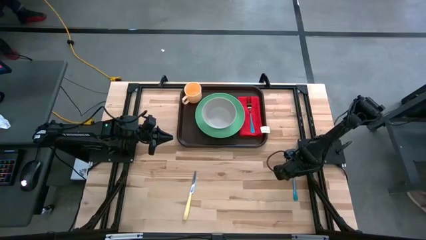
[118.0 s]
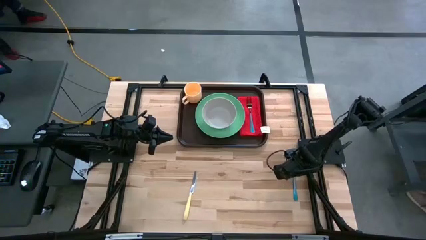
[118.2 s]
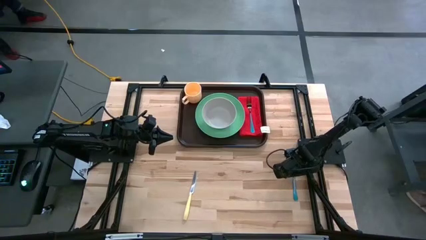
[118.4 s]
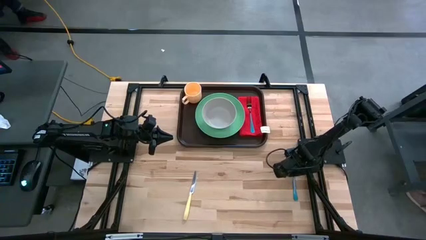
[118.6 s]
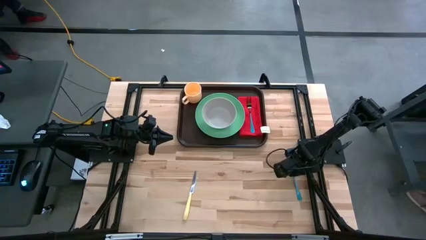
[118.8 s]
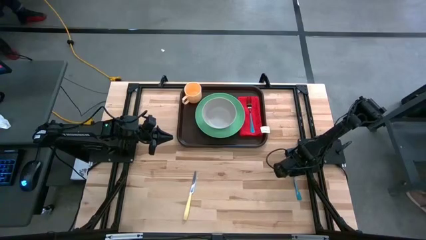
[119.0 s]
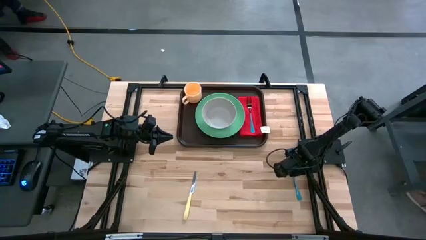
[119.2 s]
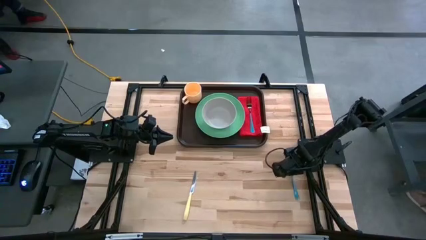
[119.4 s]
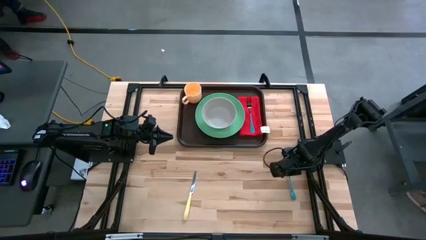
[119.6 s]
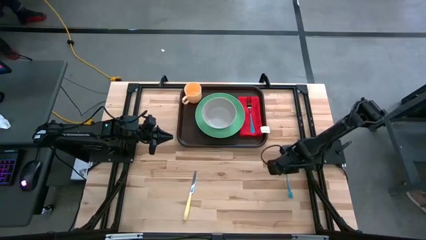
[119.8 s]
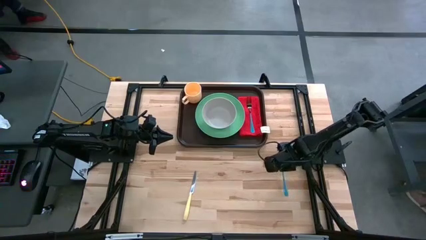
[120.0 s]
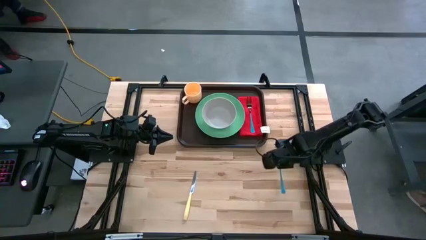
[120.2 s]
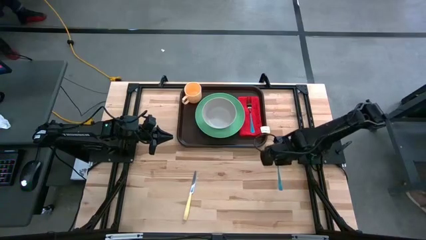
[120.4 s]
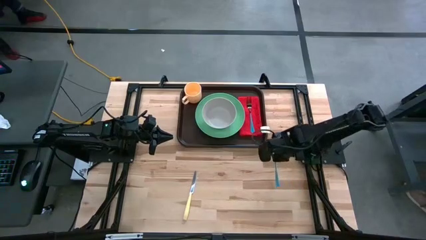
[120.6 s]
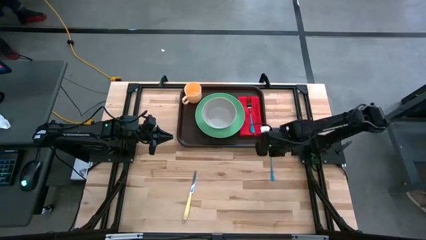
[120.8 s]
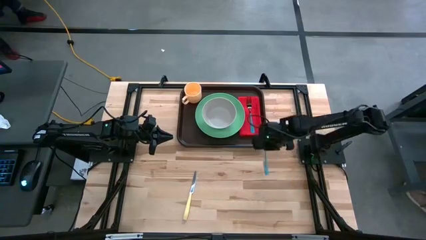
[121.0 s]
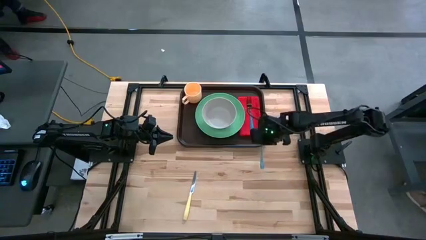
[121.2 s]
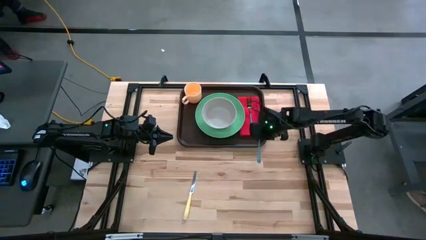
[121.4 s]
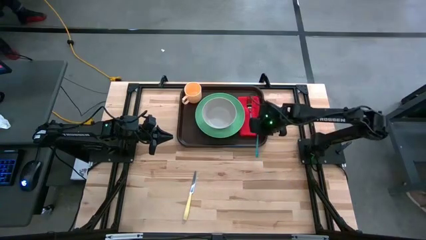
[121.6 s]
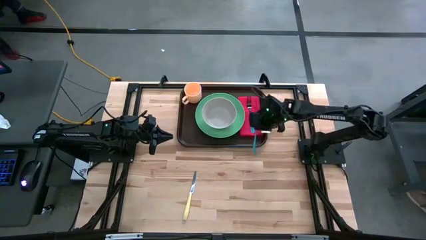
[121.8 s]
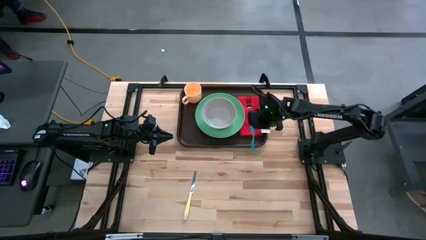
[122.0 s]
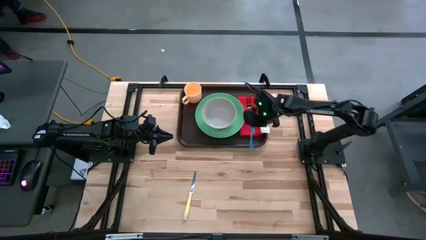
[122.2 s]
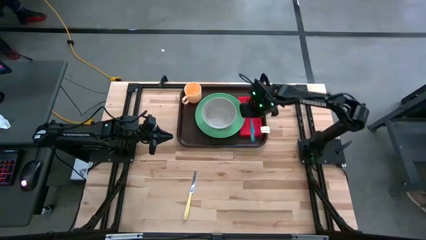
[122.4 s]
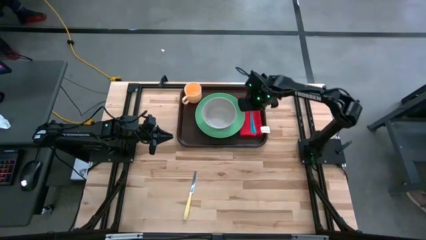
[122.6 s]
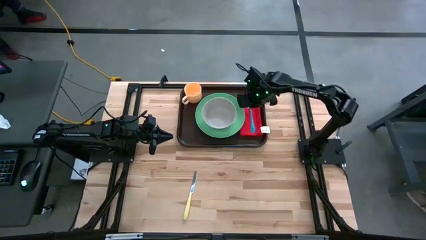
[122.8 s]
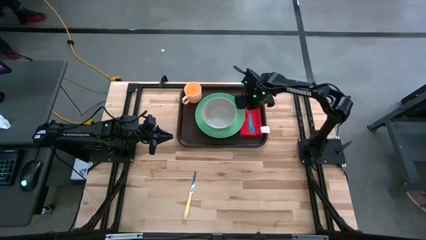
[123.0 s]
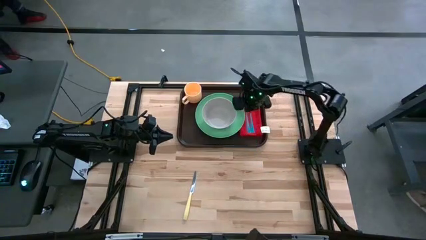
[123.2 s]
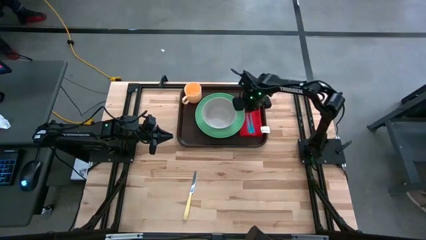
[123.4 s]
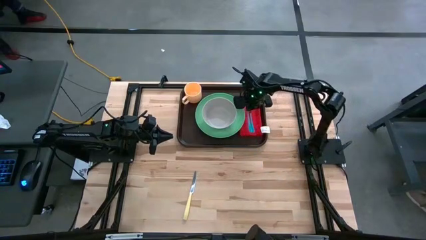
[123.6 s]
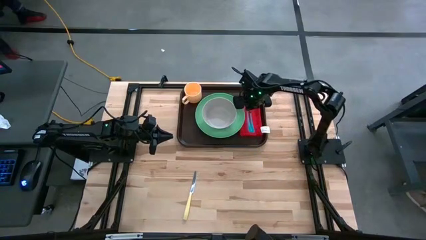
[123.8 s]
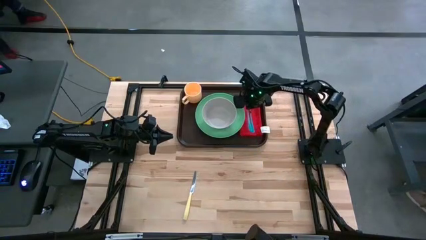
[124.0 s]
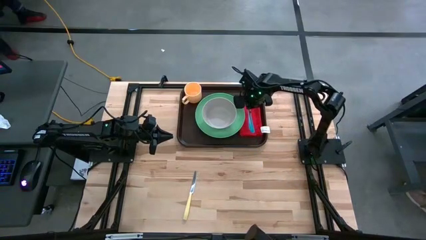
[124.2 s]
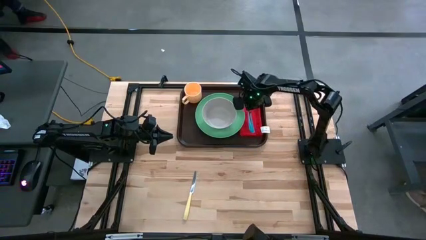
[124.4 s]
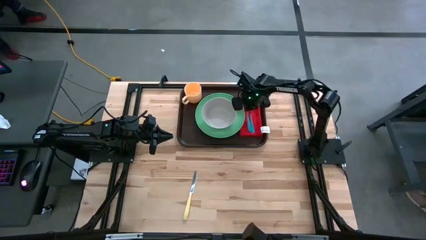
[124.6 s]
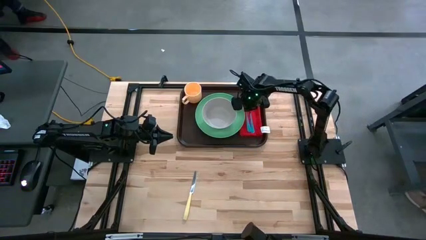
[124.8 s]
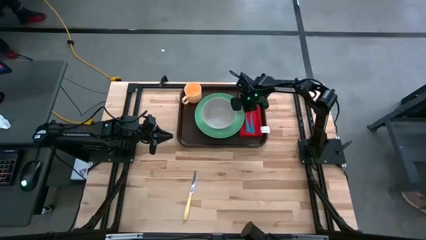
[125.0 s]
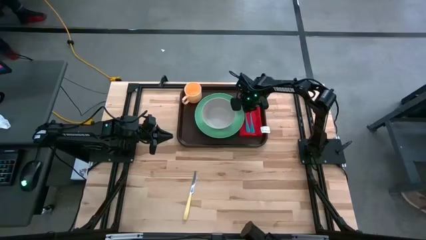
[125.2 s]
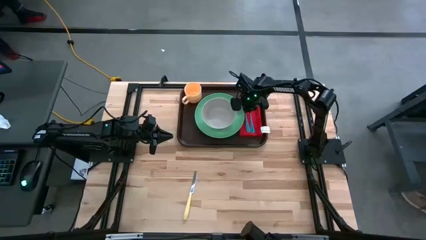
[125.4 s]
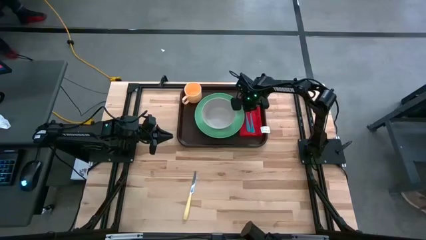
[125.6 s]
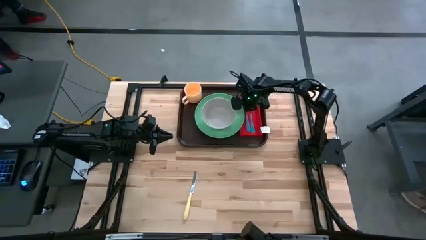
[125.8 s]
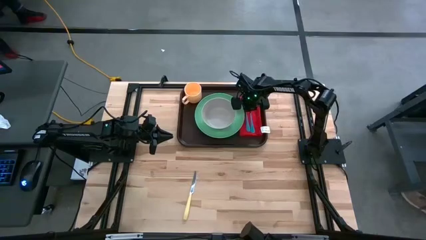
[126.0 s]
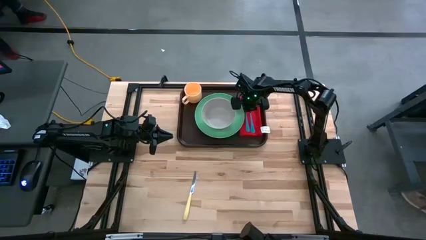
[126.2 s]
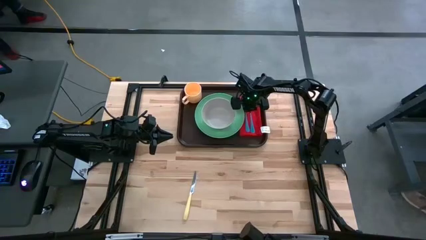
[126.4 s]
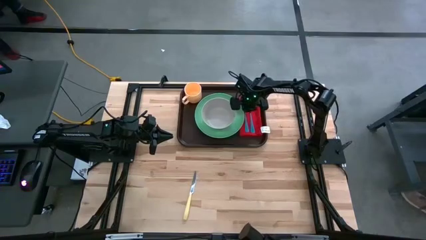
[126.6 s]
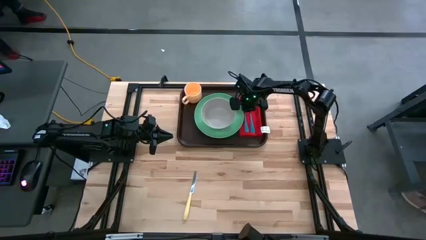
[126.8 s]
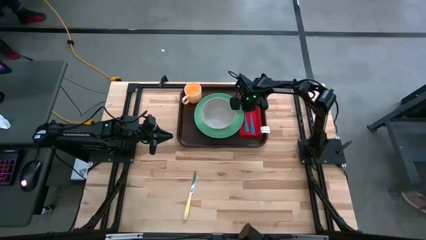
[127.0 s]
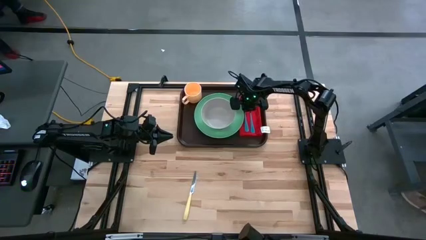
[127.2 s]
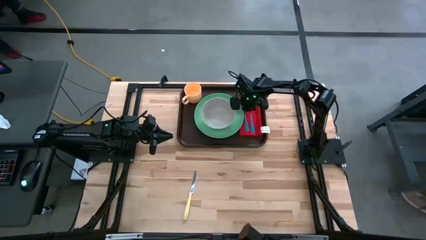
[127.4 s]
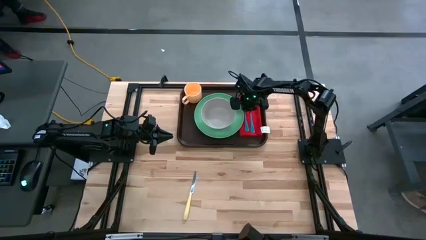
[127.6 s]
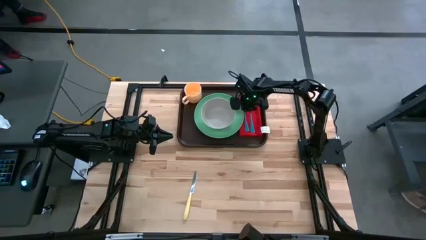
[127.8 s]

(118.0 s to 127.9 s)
Task: Set up tray
Put the blue spoon on top of the red napkin to the left of the blue fork

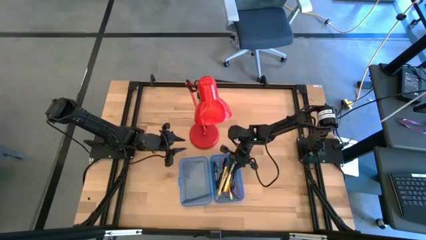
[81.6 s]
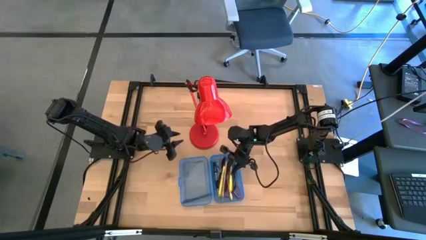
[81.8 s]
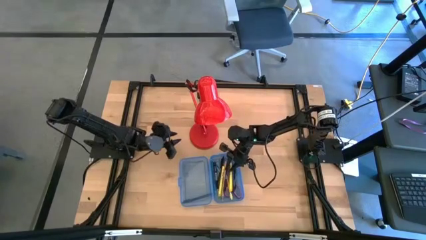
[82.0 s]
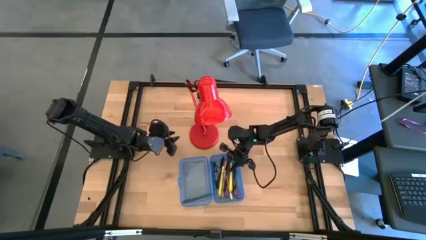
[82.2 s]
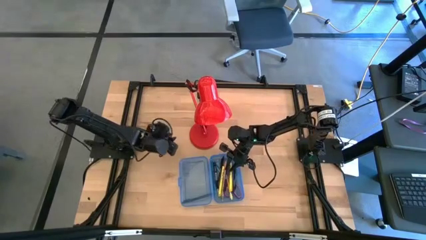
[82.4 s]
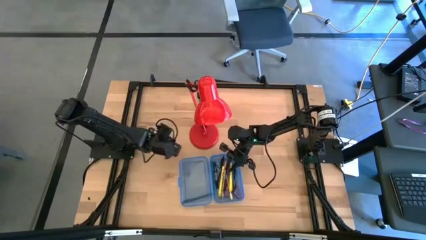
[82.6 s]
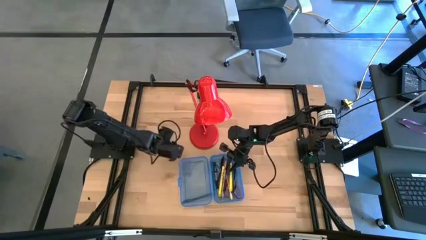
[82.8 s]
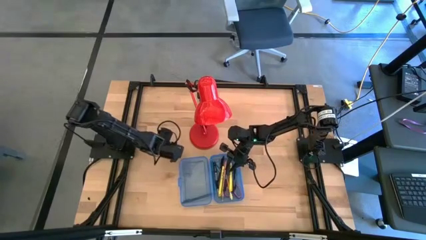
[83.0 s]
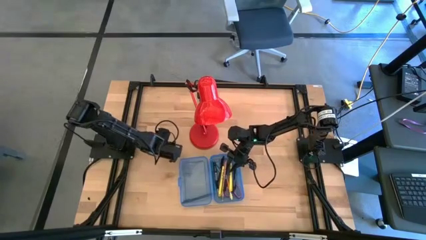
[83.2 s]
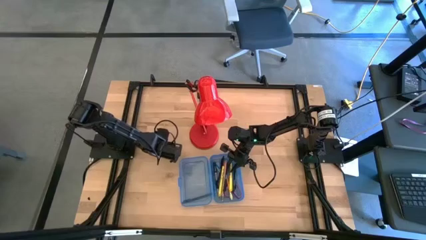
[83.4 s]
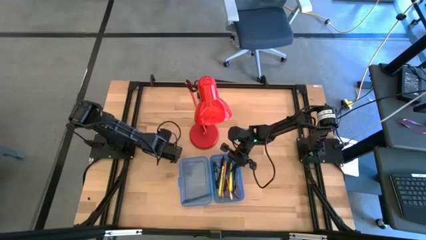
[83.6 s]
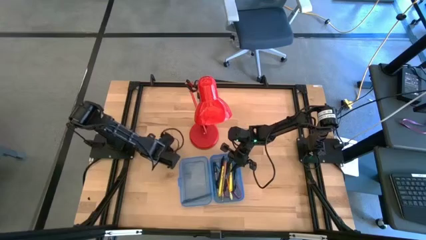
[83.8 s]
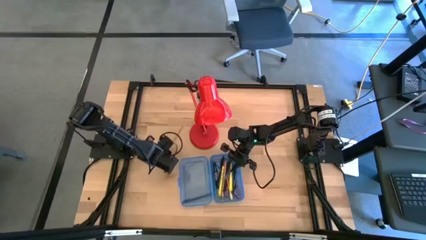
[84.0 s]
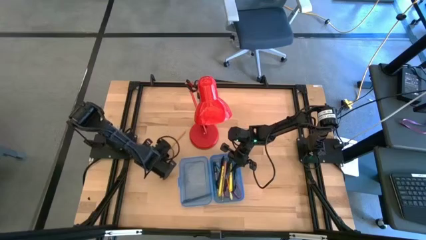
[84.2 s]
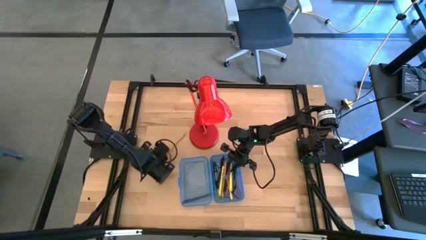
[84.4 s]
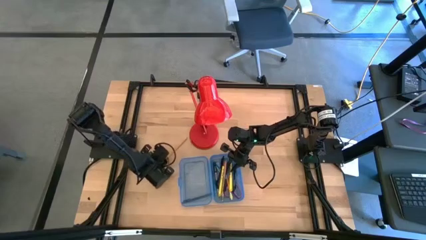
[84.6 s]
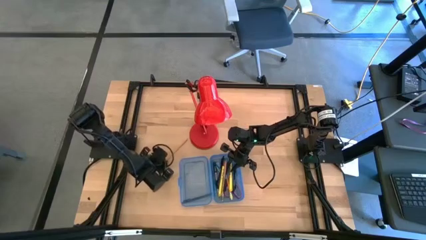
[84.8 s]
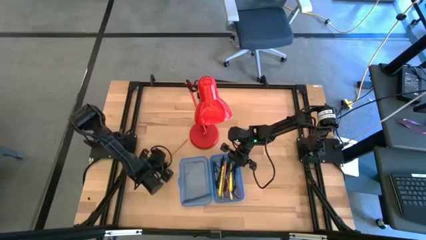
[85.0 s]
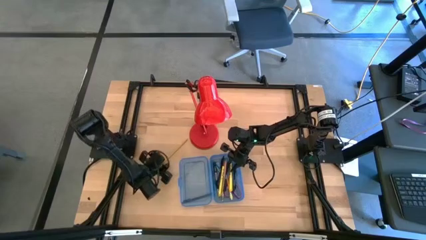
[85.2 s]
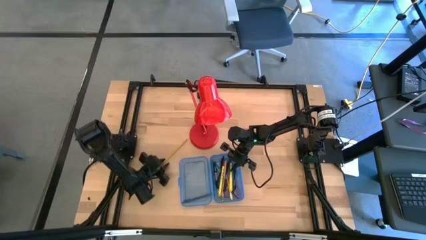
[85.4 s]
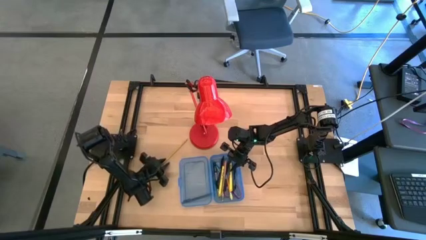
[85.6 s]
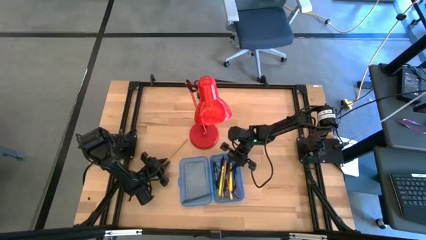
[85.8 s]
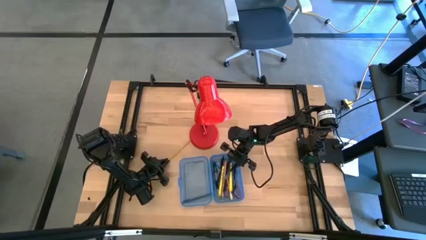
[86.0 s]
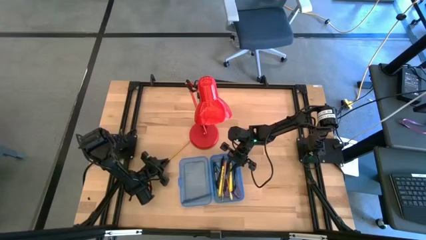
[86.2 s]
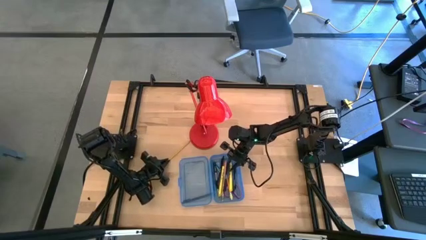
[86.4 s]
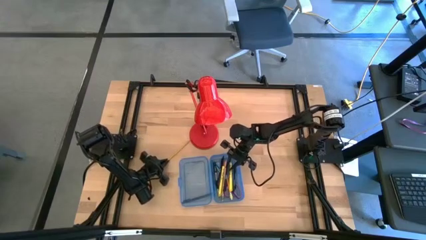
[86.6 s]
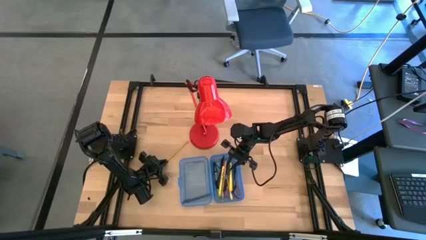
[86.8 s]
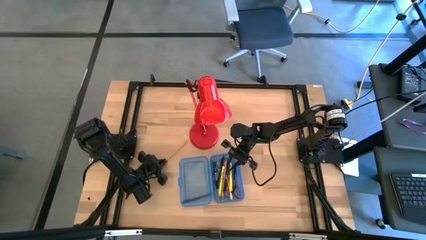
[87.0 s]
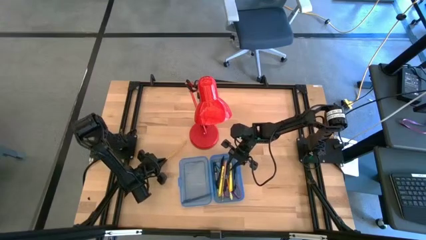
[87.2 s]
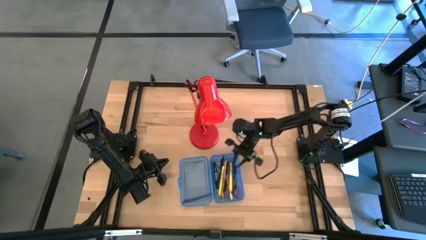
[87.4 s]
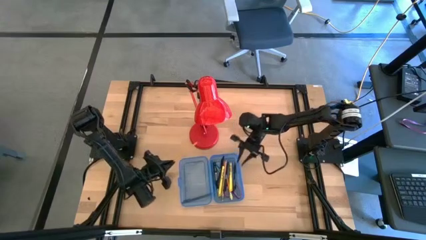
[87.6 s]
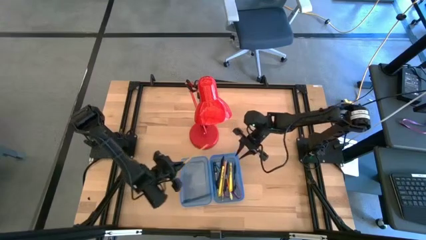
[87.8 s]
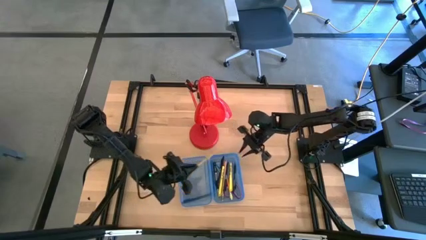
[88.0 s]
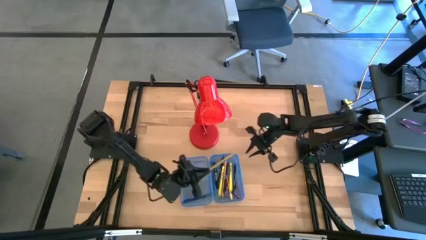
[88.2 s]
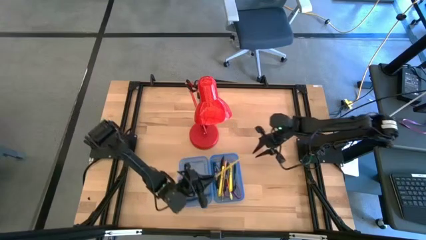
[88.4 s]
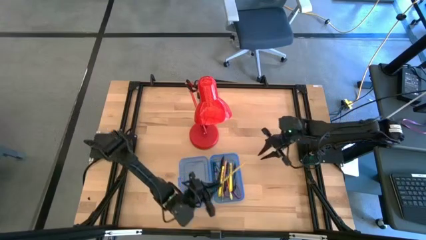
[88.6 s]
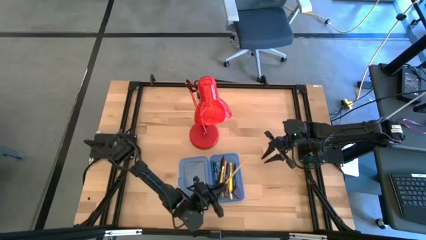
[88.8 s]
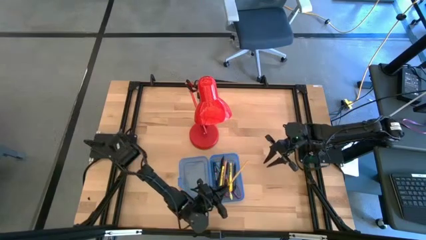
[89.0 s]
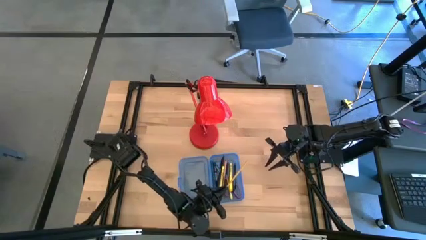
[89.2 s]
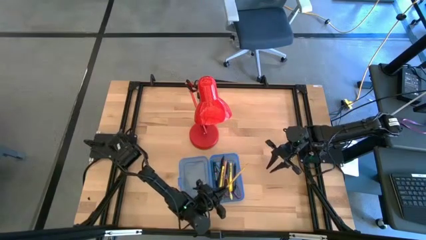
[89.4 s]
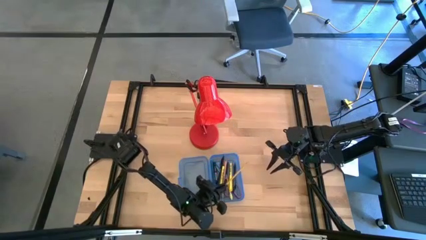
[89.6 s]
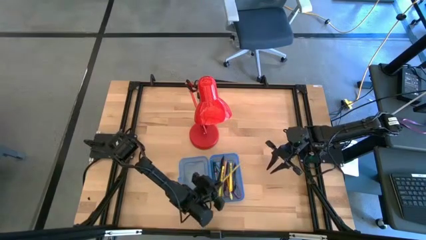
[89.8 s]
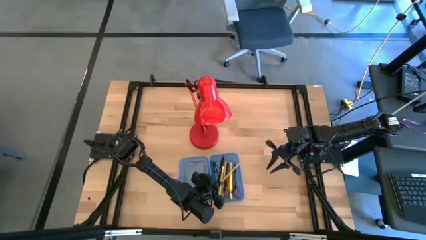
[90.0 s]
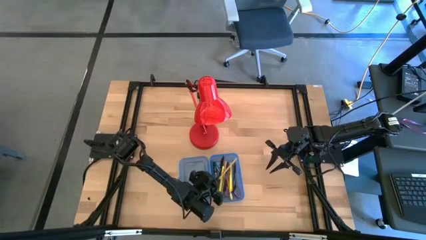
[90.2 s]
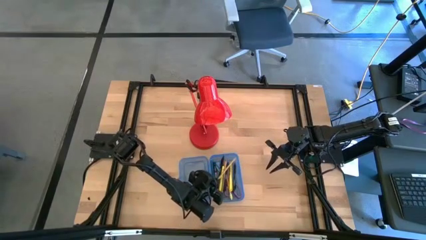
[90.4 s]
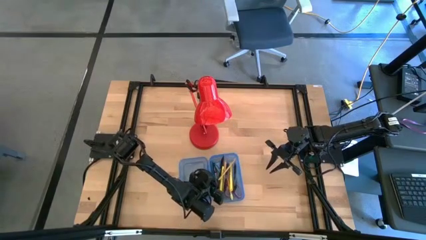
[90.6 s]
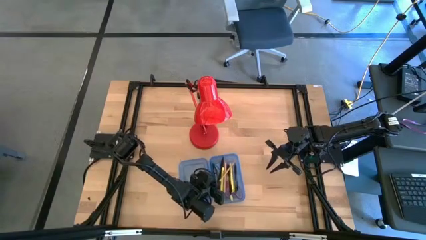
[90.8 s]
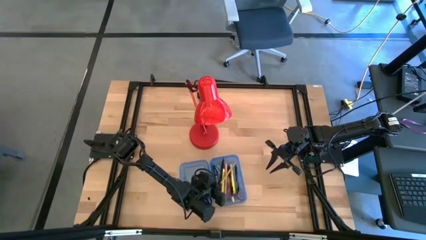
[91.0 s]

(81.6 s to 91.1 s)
Task: Pick & place school supplies into a supply box
Put the yellow pencil into the blue supply box
